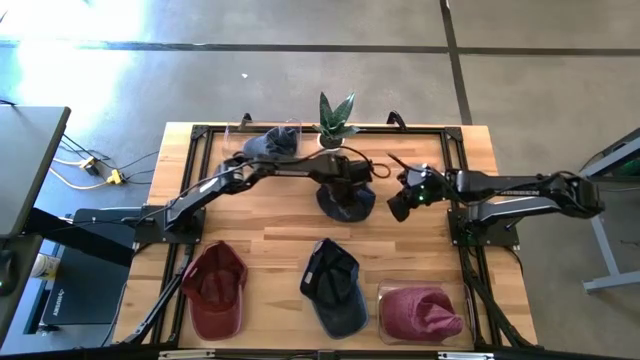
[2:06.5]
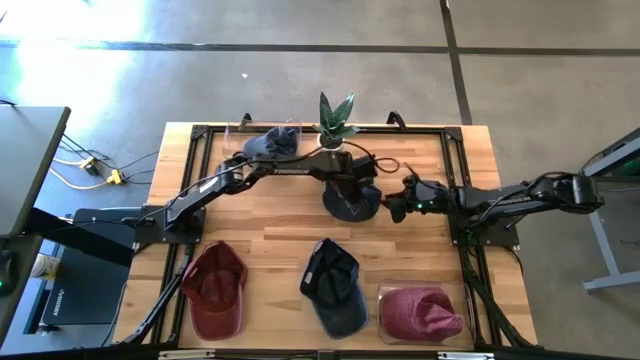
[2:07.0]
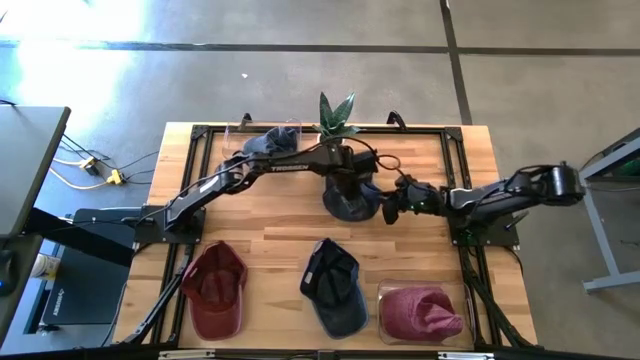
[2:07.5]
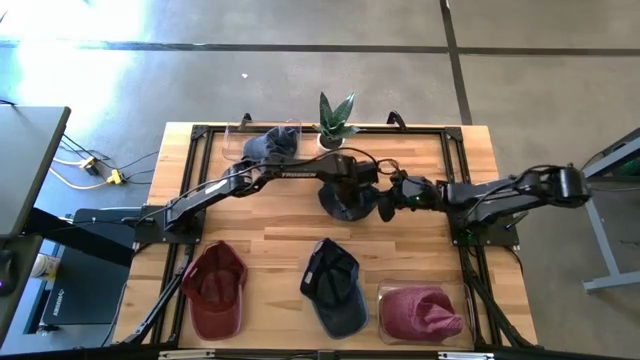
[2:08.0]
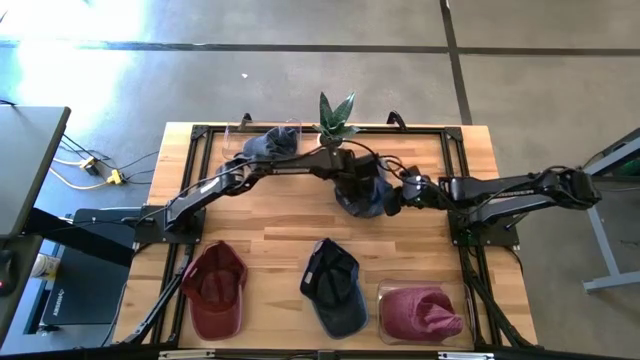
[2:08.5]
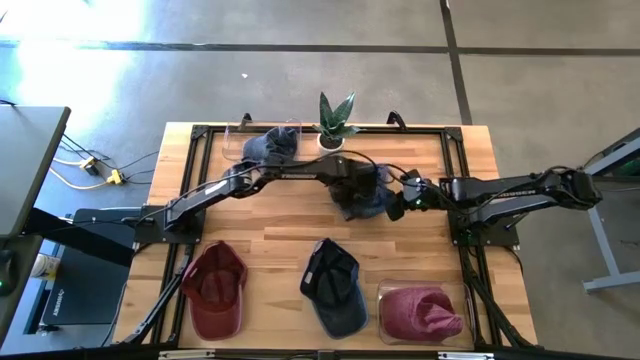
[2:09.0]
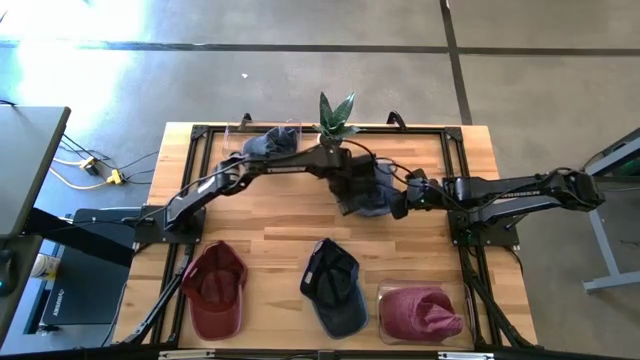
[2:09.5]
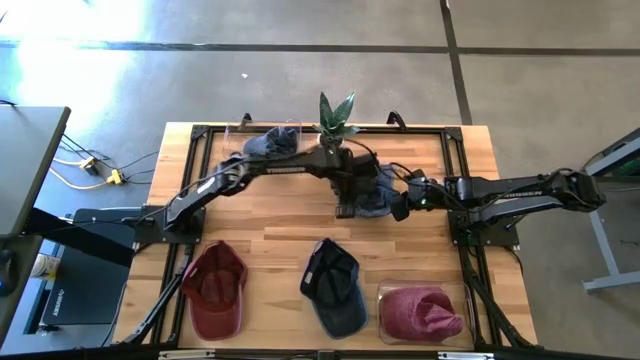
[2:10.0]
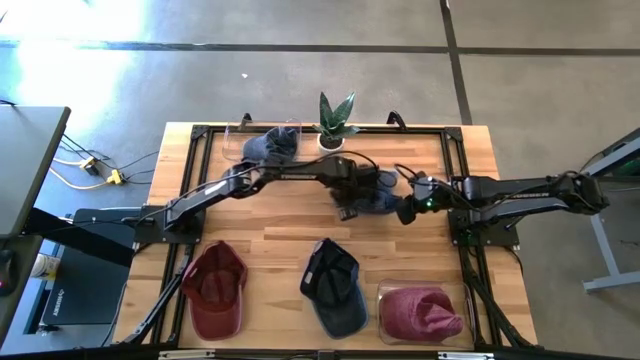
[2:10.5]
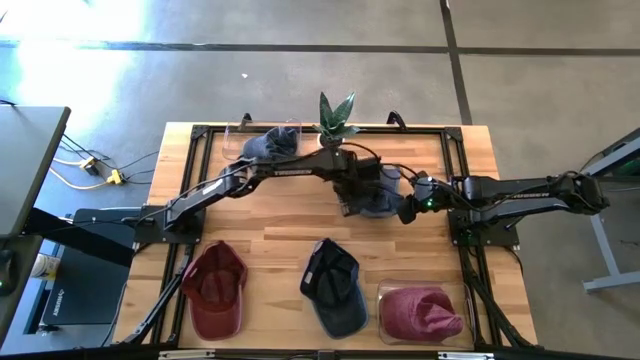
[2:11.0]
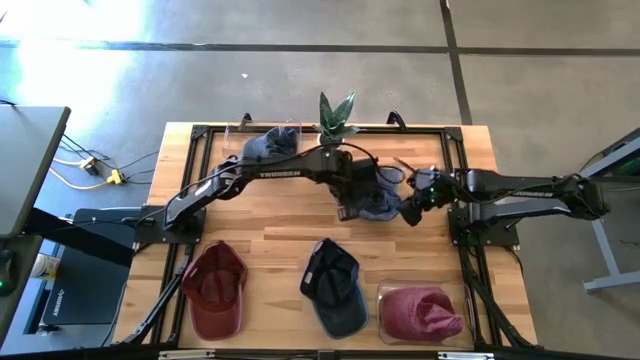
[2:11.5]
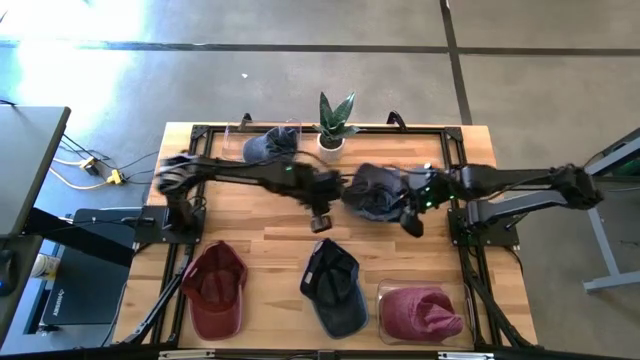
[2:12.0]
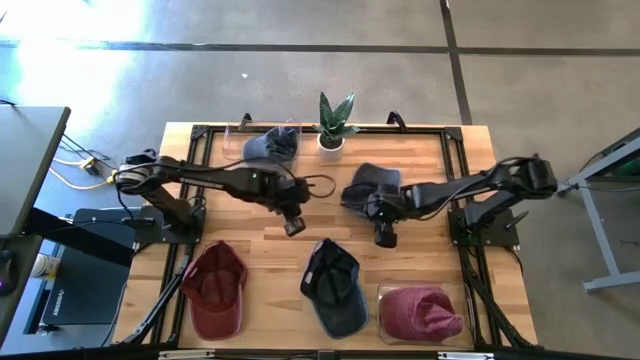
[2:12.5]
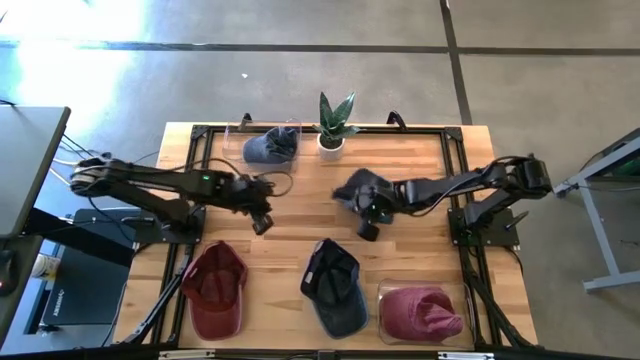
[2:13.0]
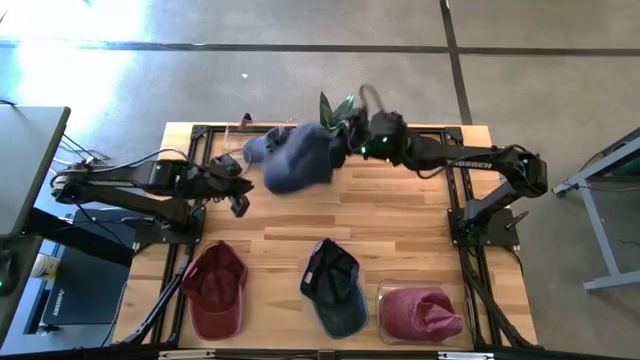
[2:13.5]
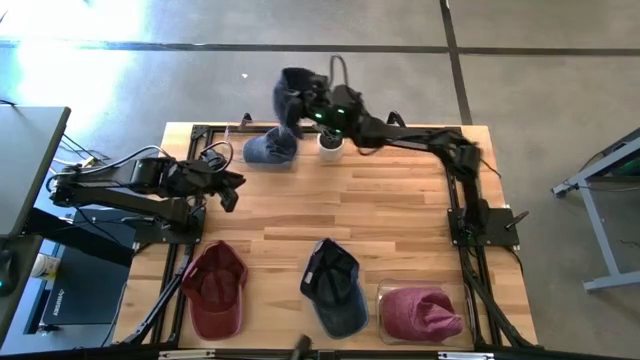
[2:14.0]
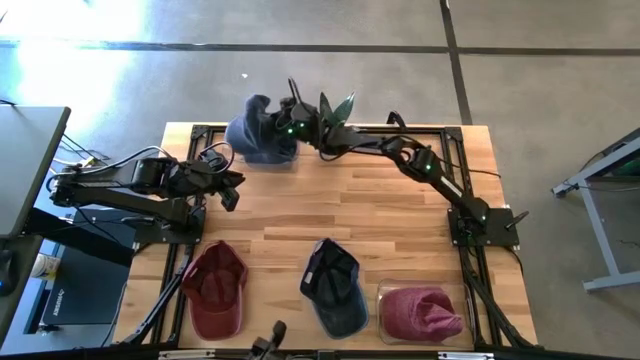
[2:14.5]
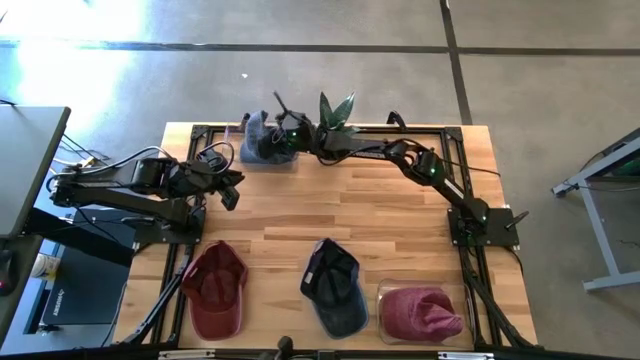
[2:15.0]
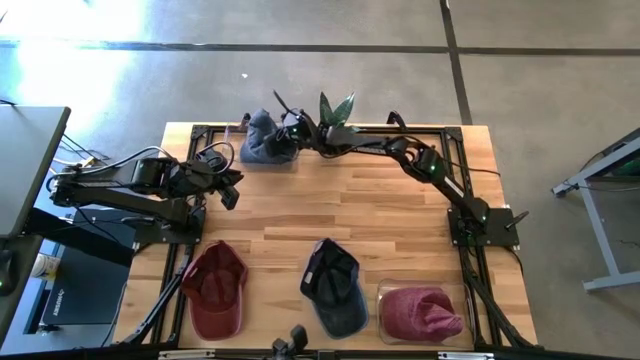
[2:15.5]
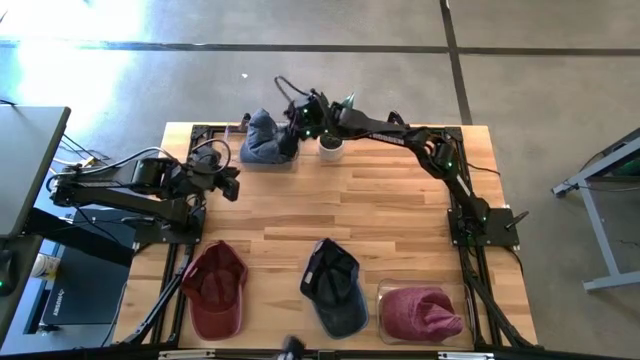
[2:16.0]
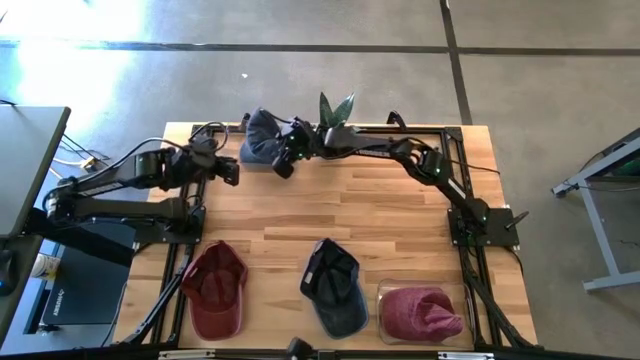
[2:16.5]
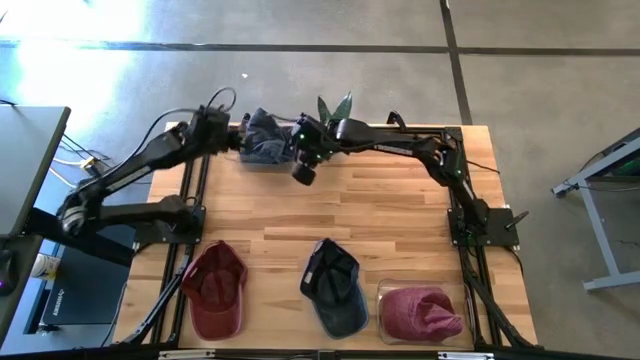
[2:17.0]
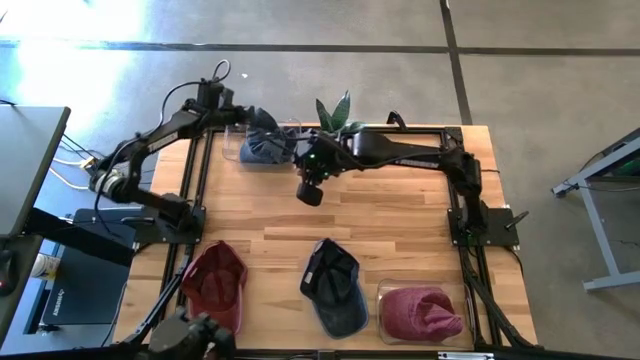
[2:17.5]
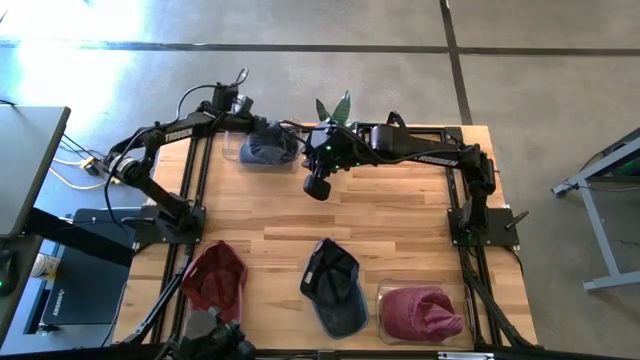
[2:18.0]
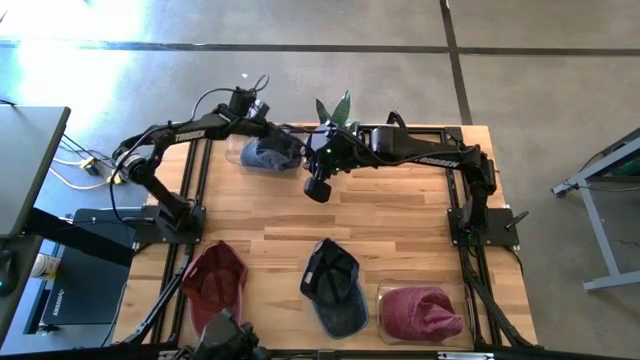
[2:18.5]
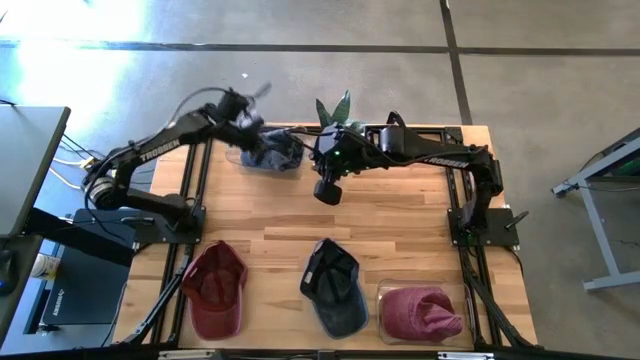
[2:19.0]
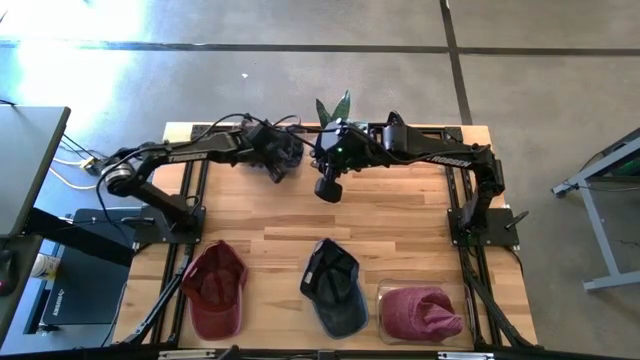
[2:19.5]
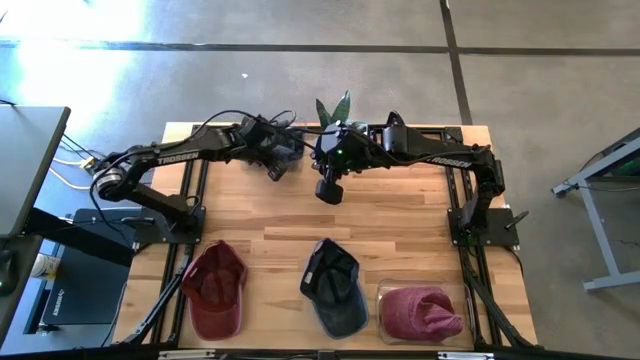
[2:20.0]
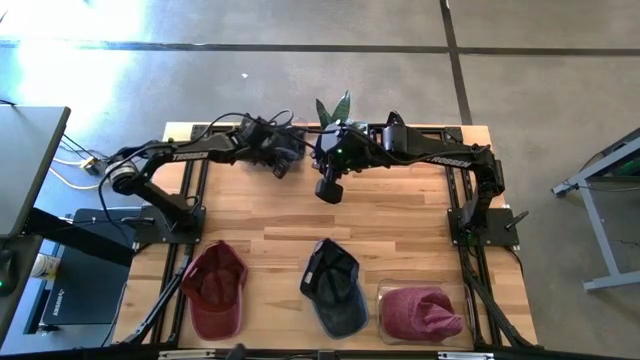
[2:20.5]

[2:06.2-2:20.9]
Task: Pick & Place hat
Put the right blue cap into the top transparent bin

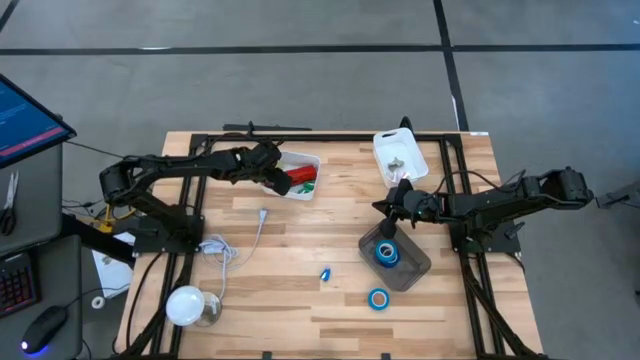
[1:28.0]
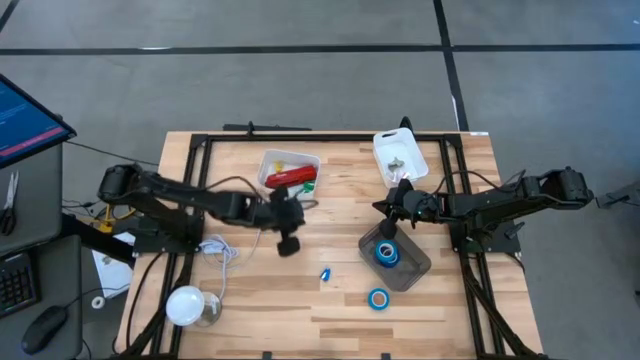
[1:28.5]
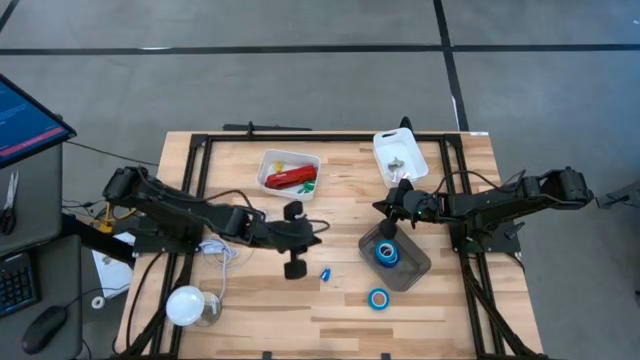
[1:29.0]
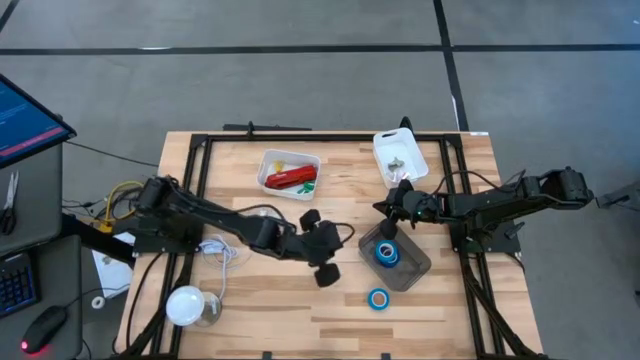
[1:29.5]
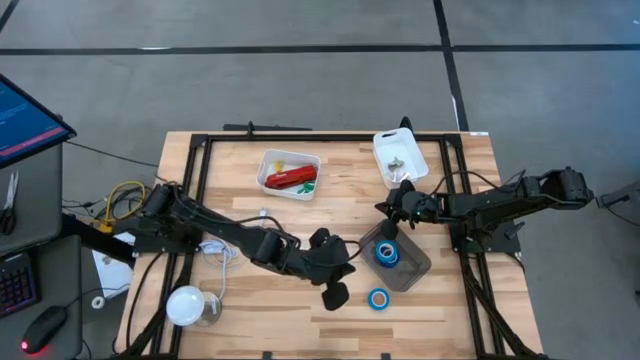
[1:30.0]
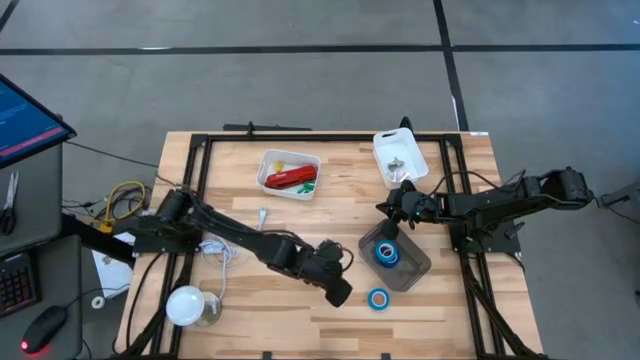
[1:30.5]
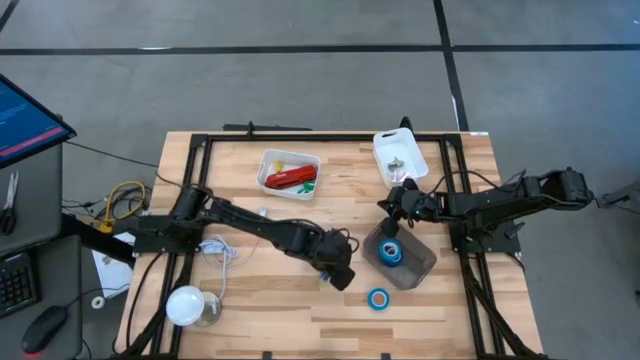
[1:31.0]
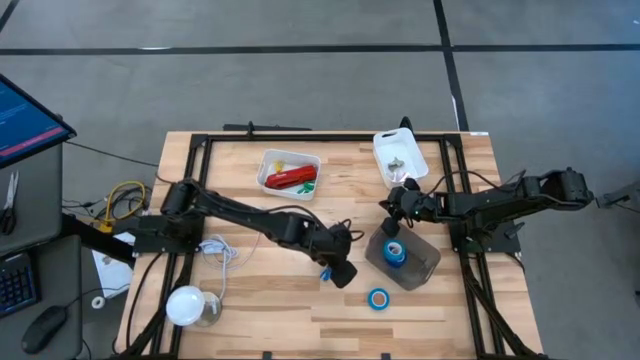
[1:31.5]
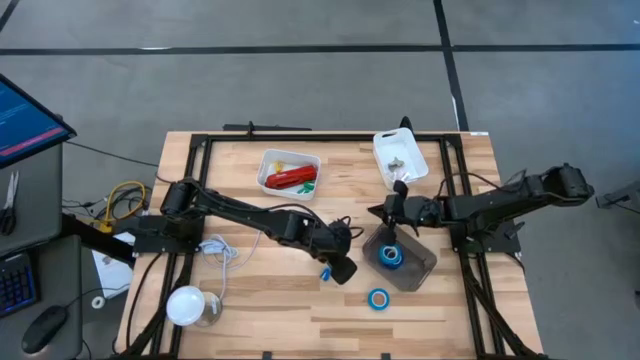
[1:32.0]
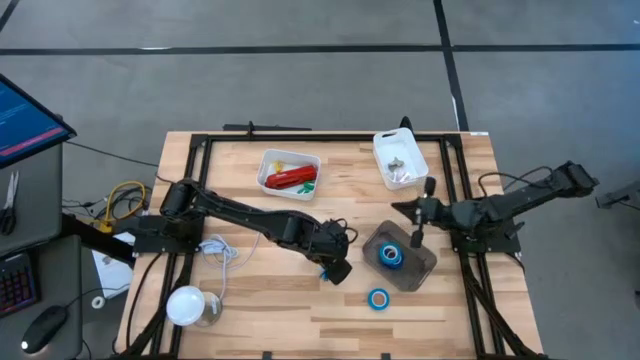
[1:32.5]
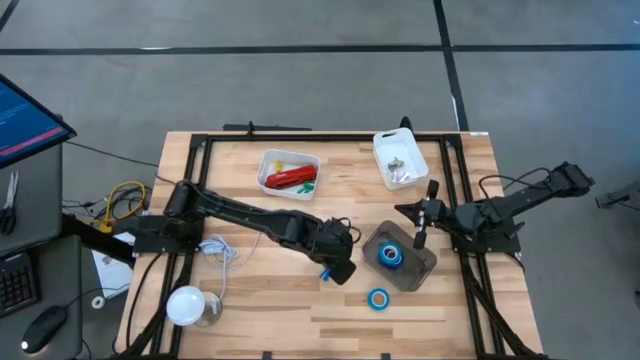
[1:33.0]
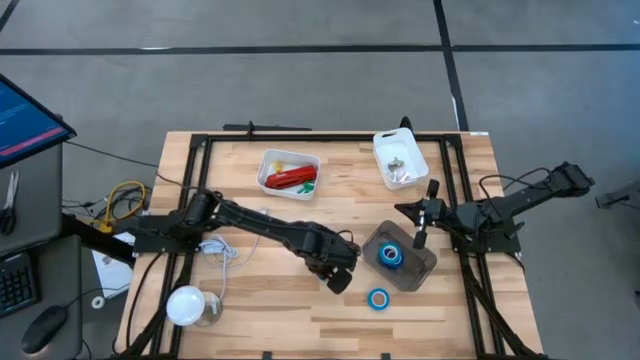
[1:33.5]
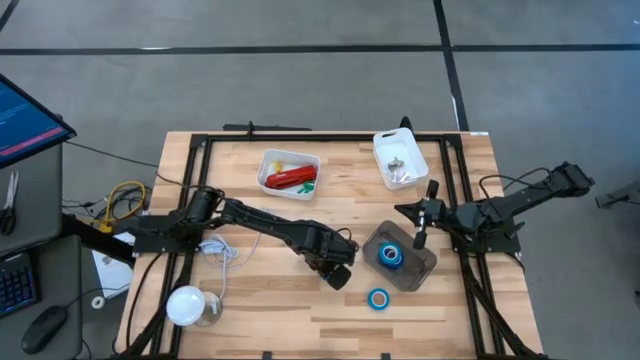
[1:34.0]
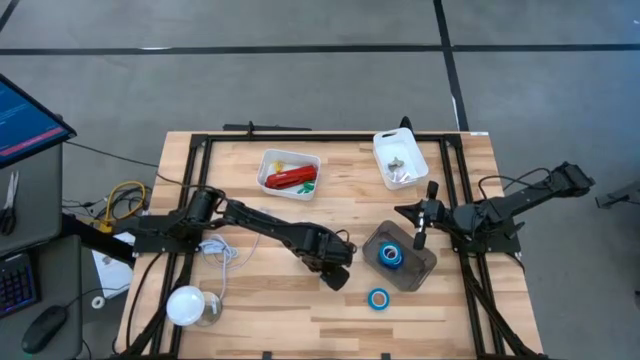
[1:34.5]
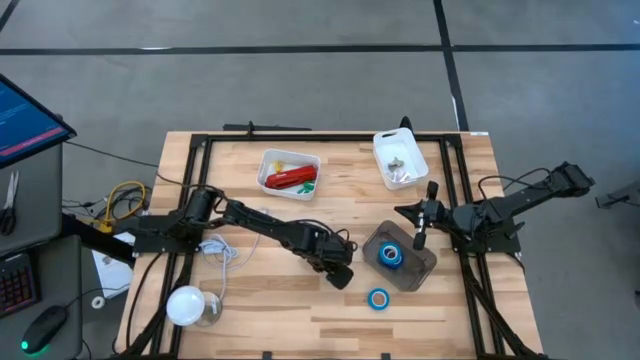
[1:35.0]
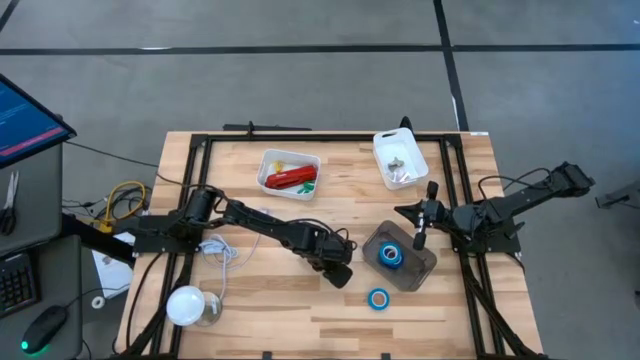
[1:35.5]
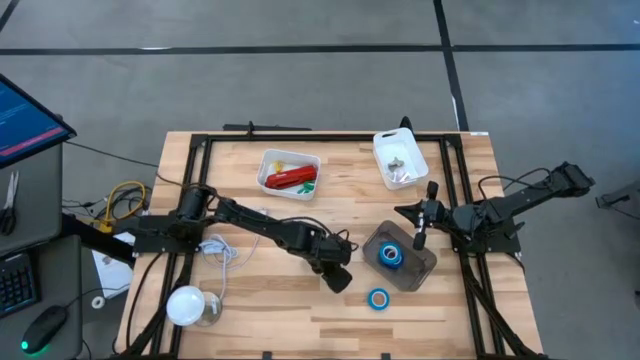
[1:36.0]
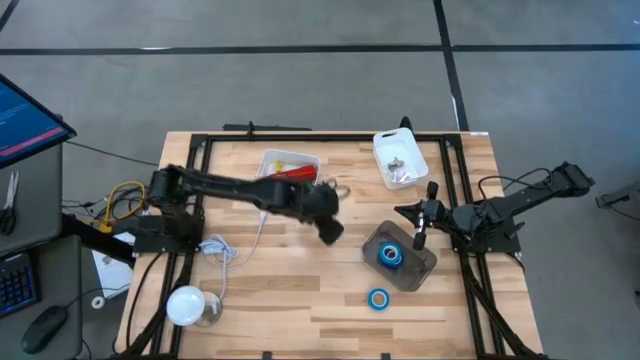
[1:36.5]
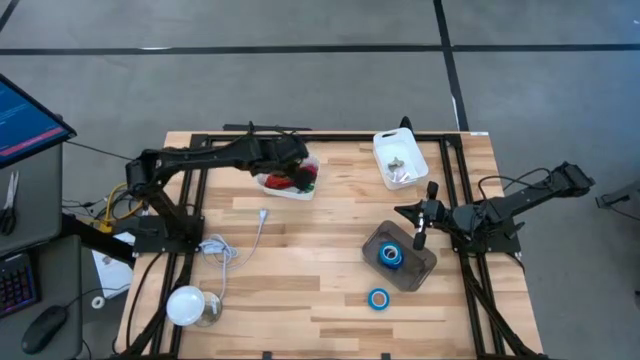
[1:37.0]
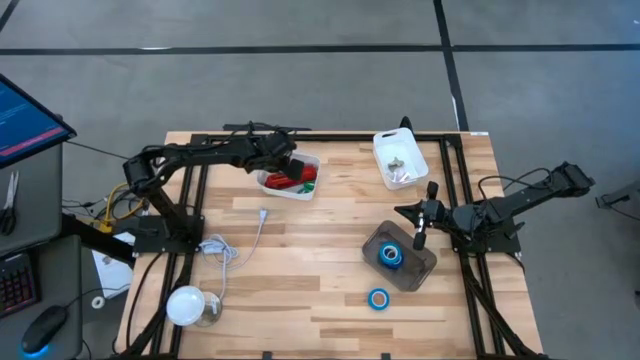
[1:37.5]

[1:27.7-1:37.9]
Task: Pick and place Stapler, Stapler remover, tape
Put the blue small stapler into the left white bin
